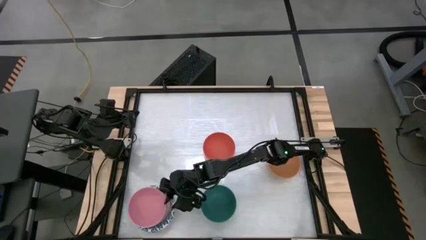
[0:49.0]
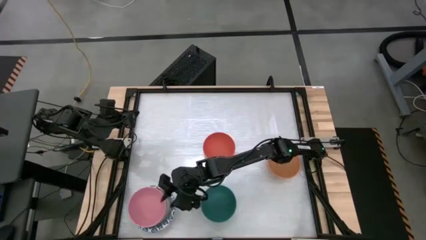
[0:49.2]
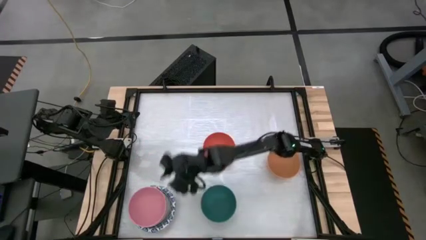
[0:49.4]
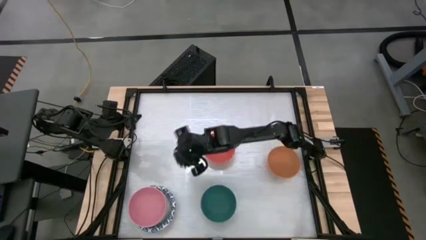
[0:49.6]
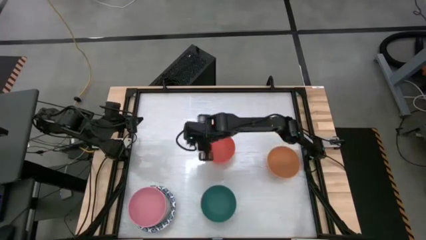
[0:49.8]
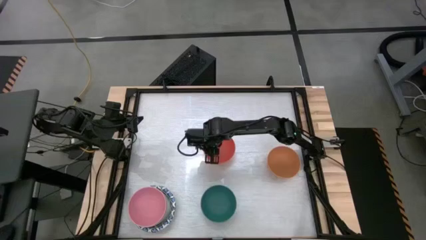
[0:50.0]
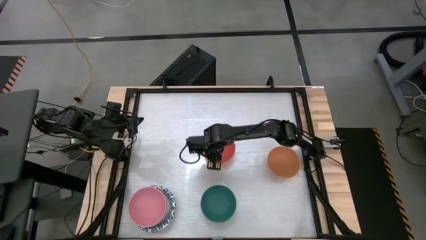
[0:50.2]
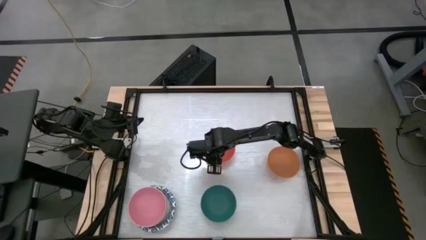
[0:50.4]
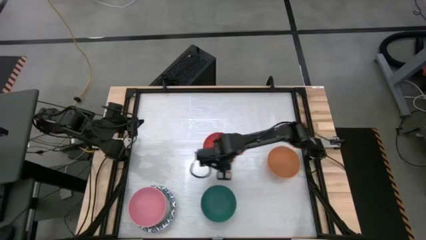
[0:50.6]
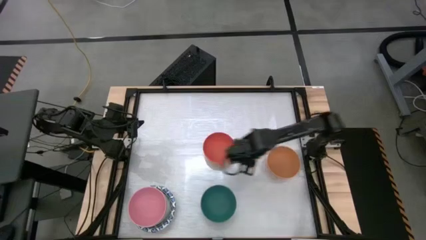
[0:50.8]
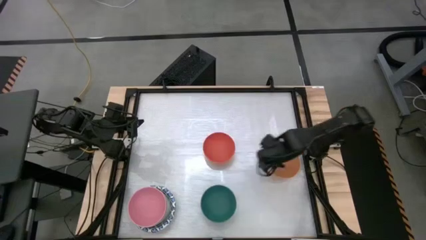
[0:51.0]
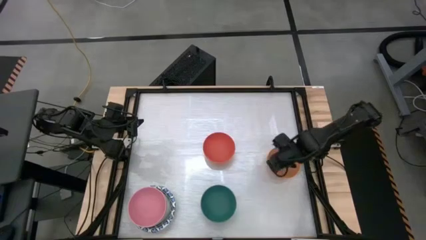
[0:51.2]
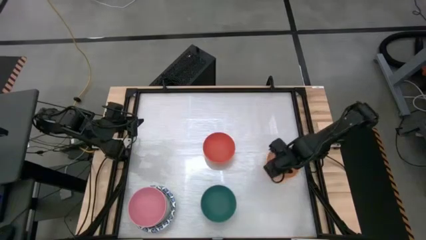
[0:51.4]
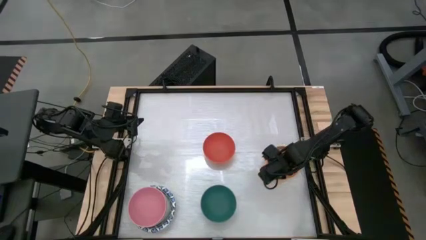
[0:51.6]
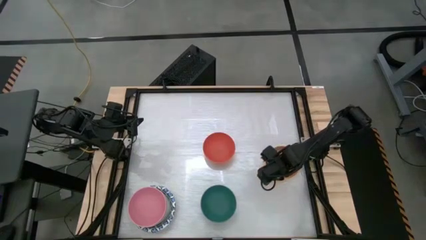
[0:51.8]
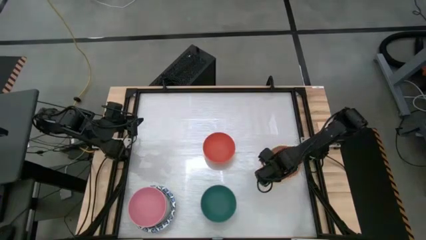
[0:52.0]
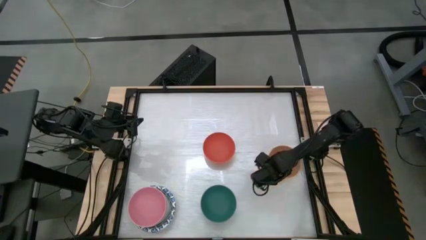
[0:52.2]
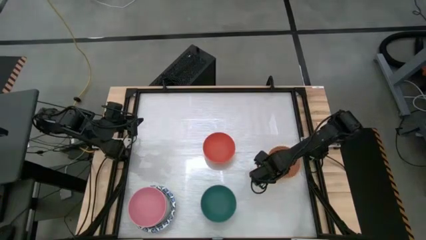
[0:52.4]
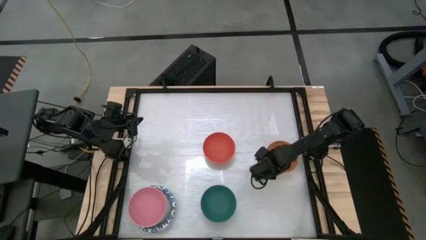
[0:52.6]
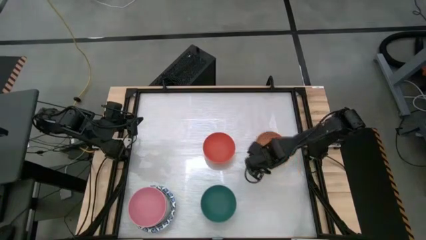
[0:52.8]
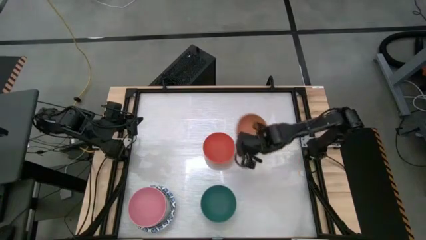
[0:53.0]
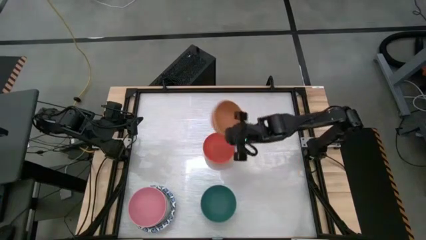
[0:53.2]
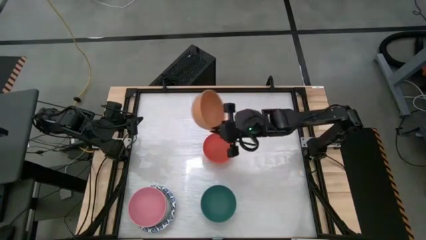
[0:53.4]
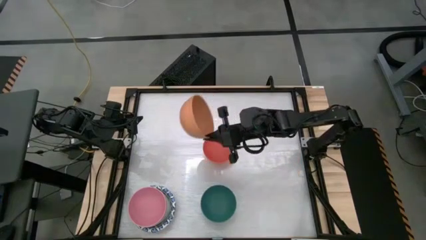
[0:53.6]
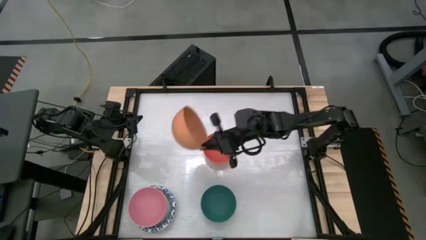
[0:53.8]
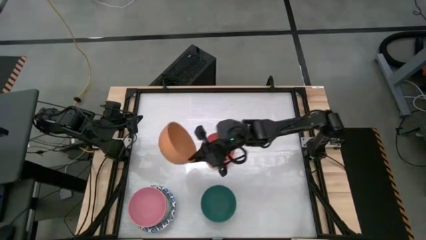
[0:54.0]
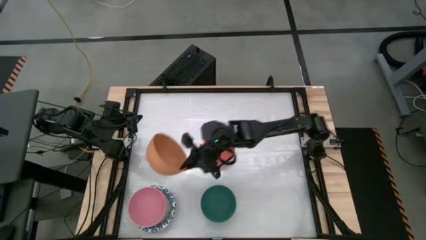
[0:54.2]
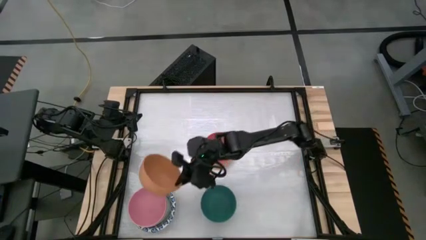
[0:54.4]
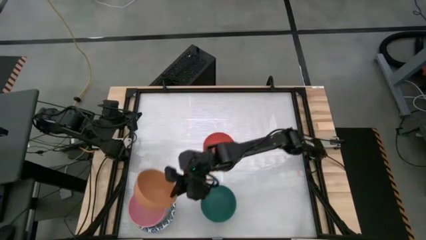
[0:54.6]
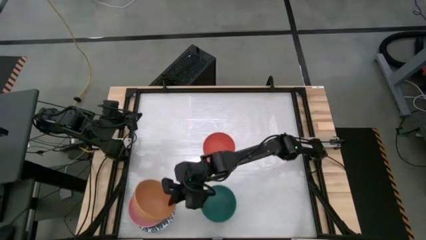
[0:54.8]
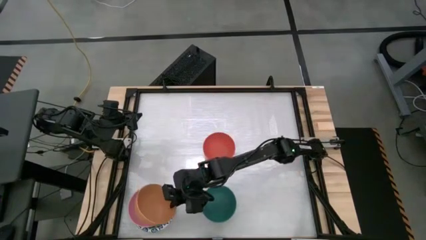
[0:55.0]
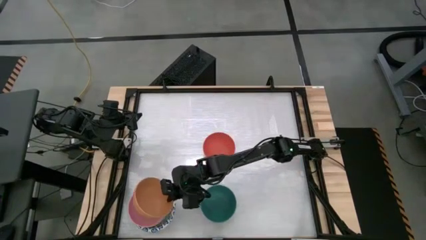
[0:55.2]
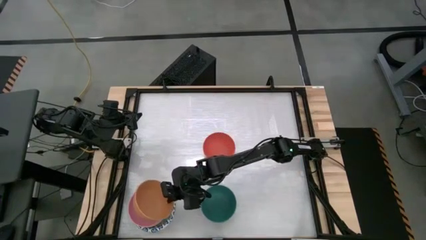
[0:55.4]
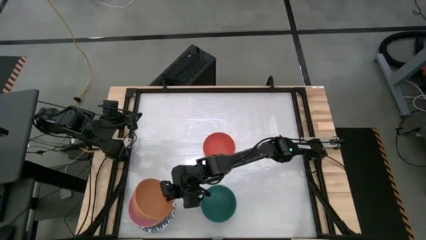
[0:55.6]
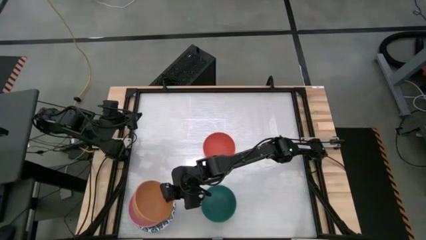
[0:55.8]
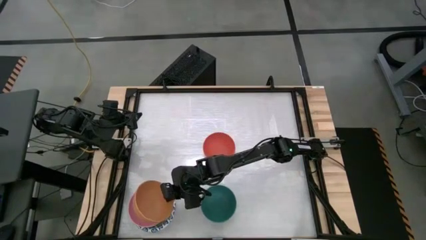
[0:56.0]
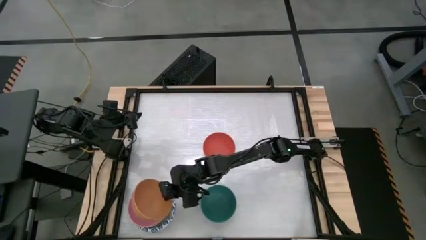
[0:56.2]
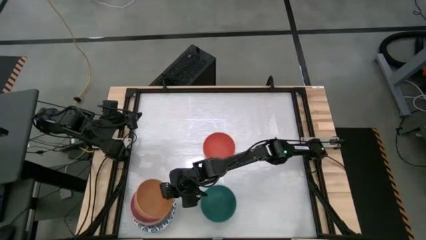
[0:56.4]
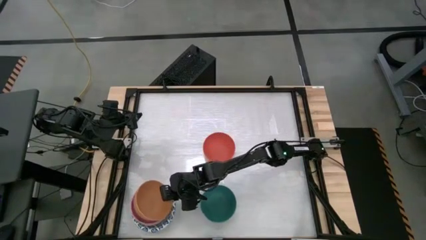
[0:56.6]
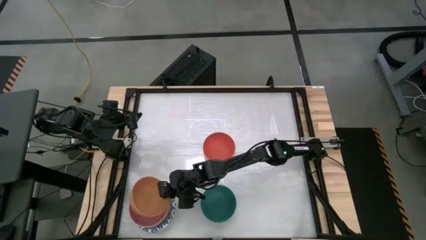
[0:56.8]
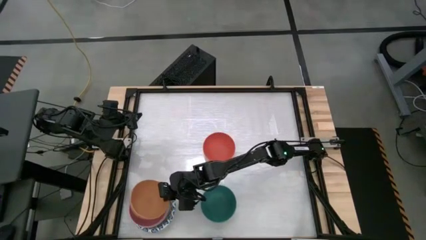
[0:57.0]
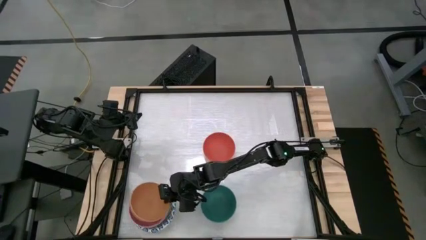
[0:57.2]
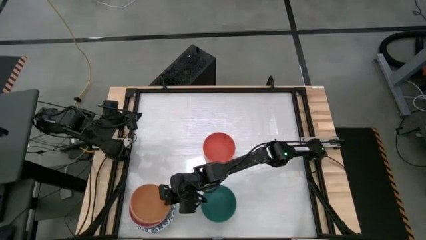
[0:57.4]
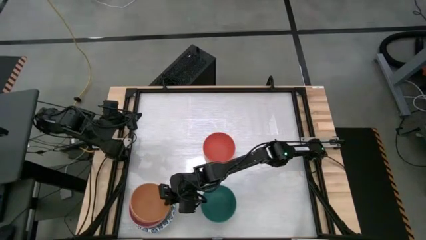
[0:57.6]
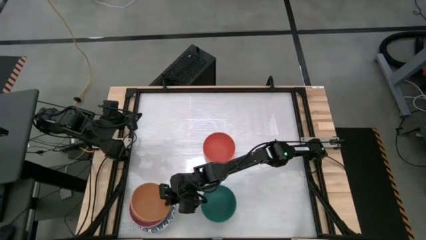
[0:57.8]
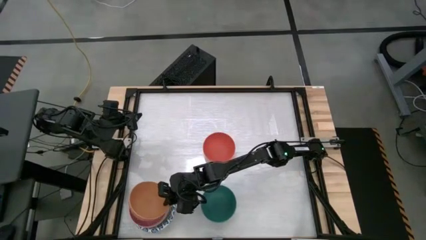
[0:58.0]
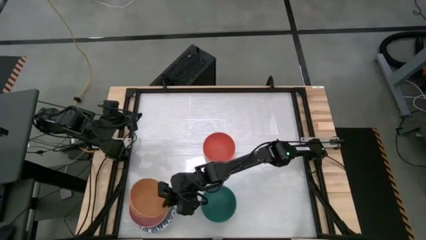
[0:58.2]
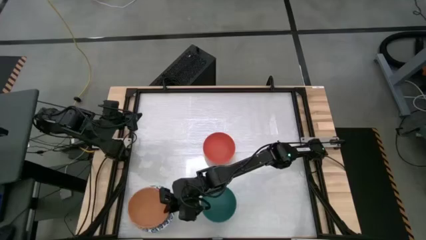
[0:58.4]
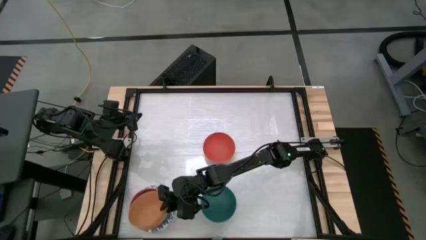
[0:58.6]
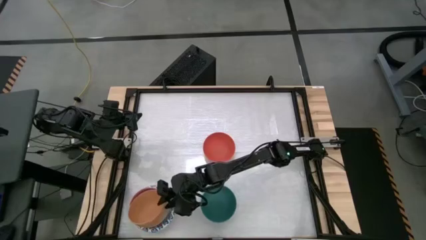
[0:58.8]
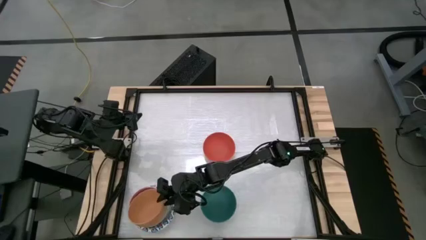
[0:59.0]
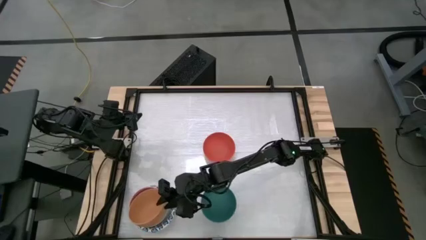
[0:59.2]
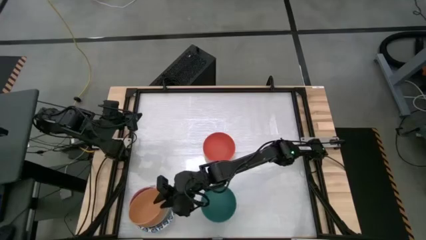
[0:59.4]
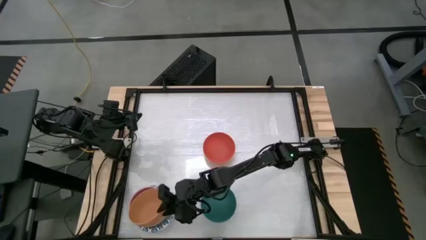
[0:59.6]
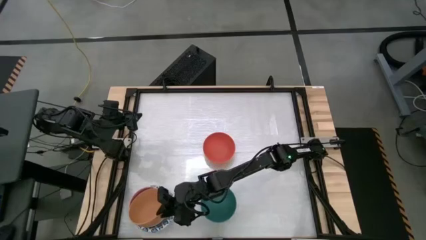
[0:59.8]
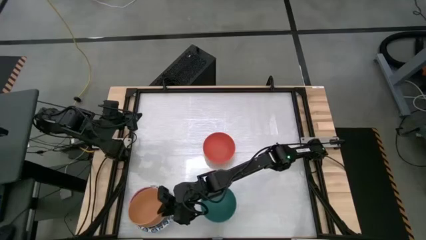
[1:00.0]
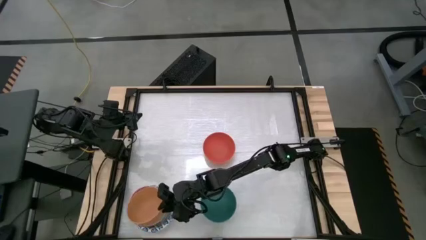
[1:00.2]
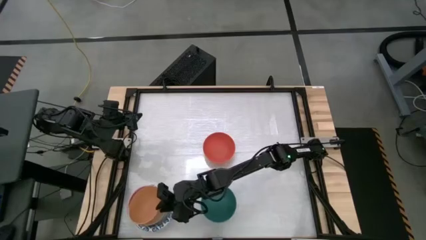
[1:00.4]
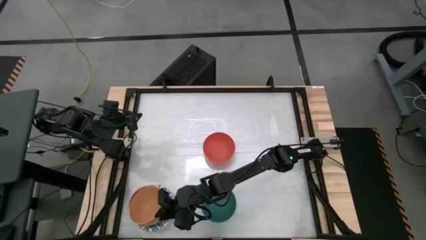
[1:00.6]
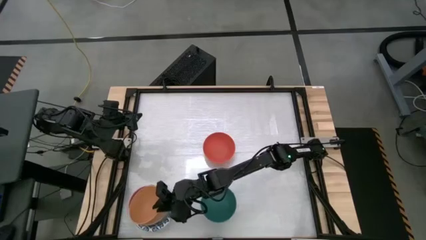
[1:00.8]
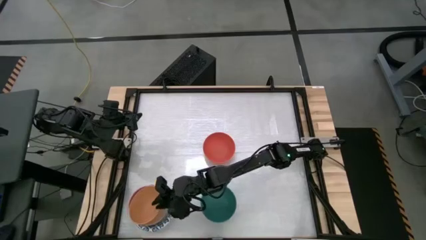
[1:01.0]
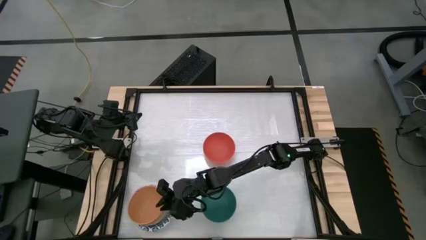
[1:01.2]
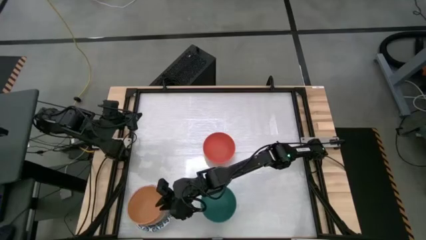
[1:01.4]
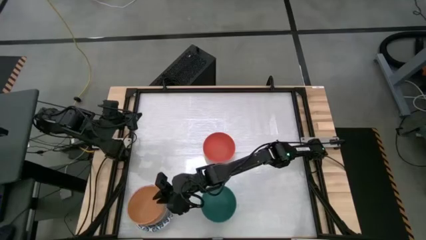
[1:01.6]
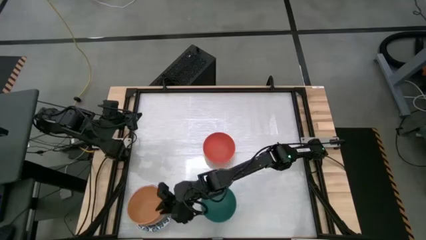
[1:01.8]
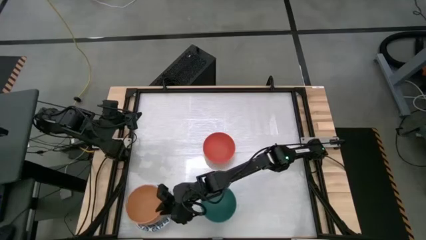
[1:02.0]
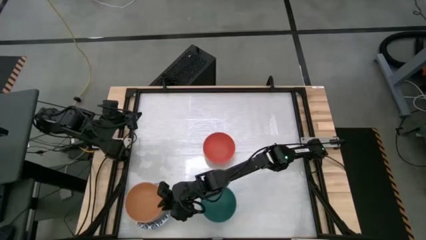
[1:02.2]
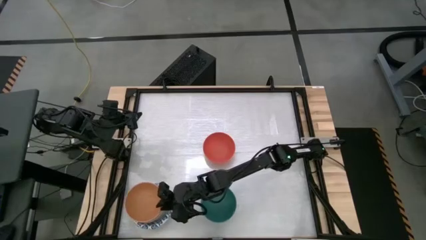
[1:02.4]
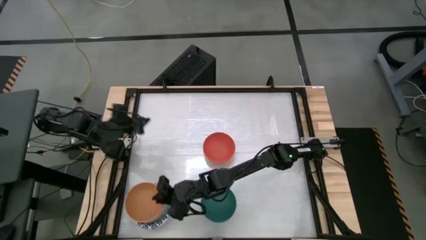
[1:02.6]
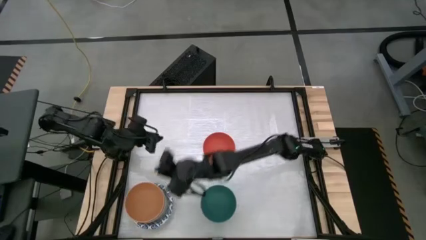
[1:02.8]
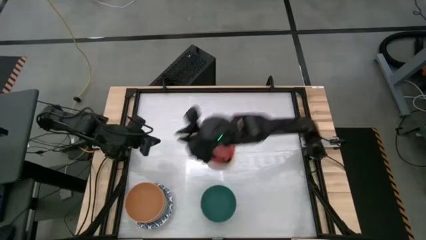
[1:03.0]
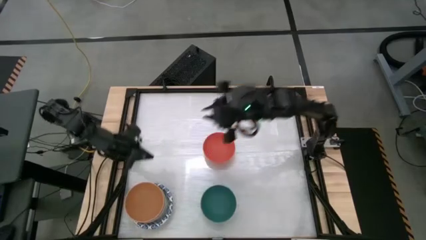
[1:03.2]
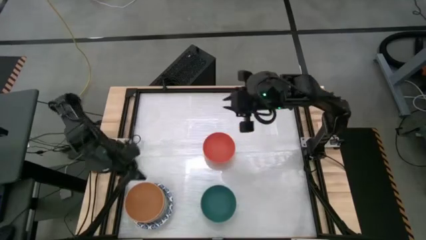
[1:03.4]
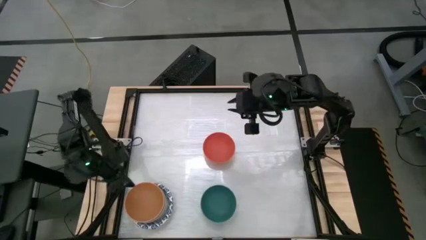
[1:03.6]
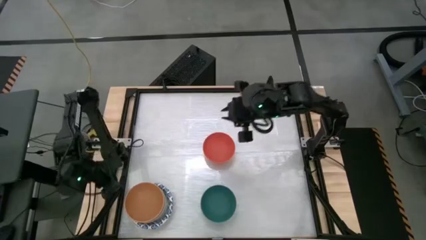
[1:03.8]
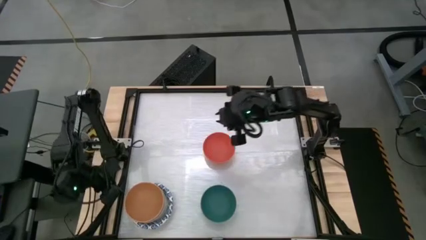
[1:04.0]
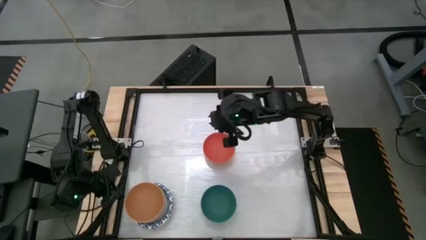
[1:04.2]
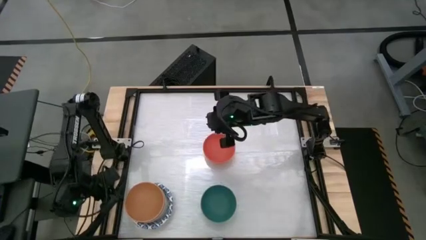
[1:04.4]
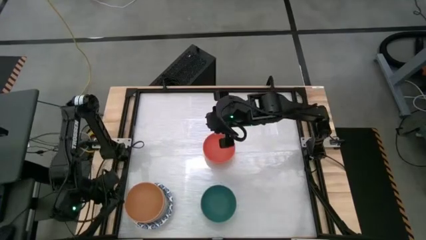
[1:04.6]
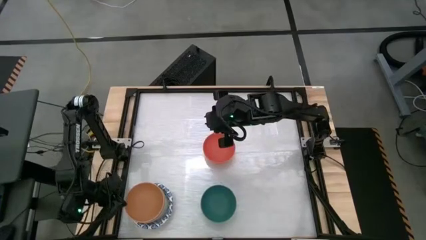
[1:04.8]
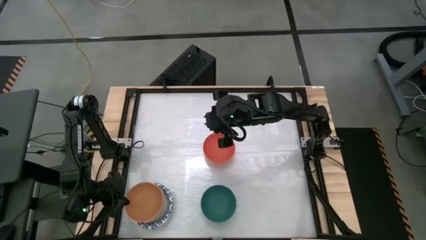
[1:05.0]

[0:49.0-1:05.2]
Stack the orange bowl on top of the pink bowl
